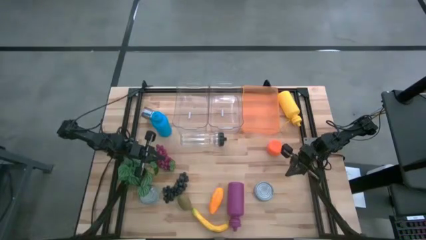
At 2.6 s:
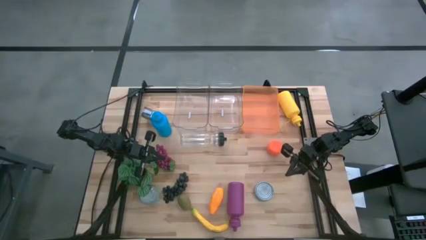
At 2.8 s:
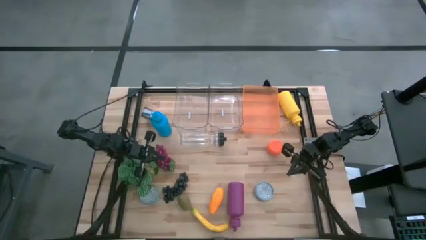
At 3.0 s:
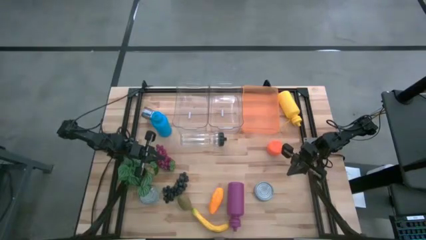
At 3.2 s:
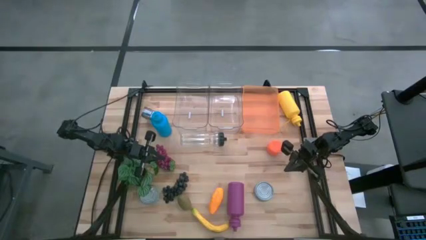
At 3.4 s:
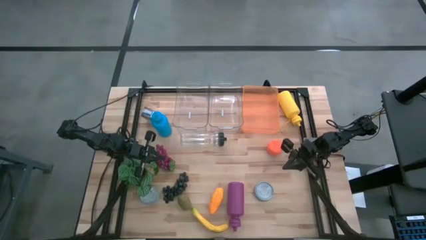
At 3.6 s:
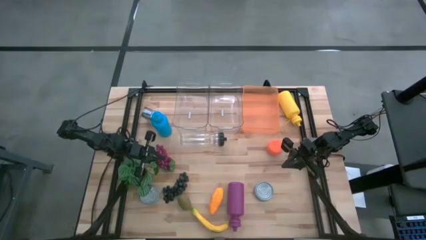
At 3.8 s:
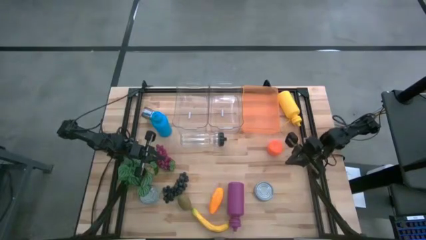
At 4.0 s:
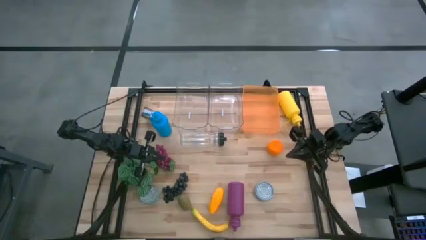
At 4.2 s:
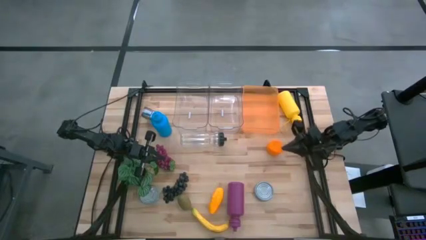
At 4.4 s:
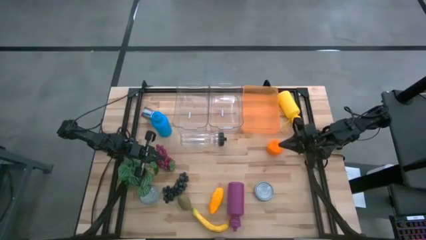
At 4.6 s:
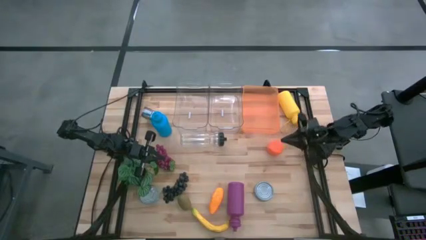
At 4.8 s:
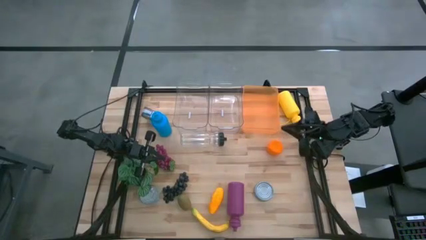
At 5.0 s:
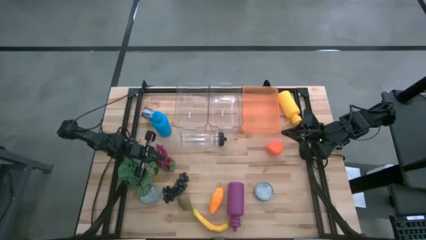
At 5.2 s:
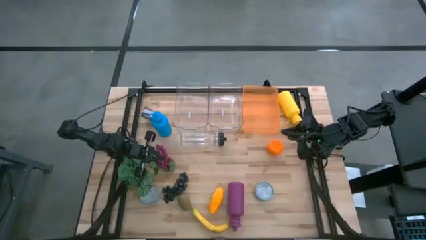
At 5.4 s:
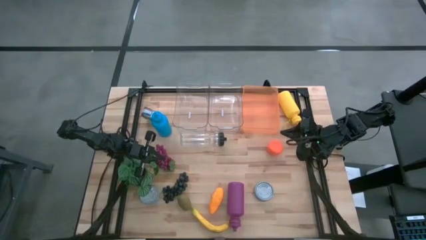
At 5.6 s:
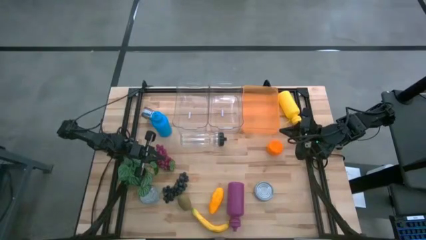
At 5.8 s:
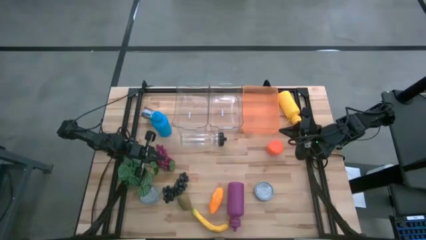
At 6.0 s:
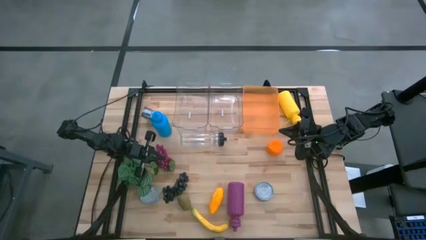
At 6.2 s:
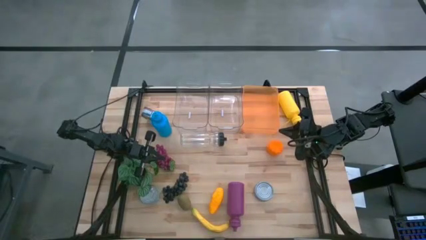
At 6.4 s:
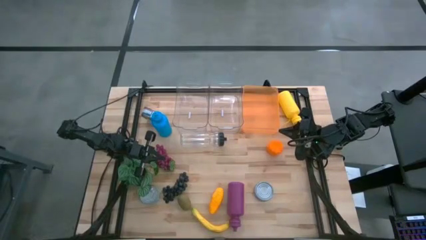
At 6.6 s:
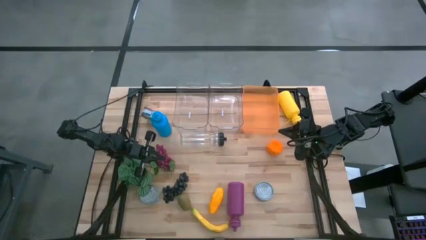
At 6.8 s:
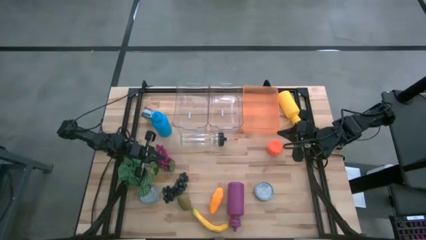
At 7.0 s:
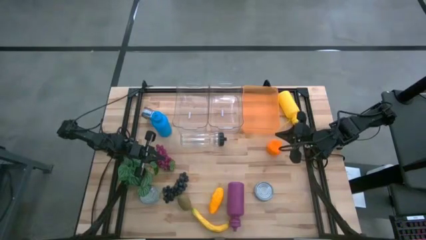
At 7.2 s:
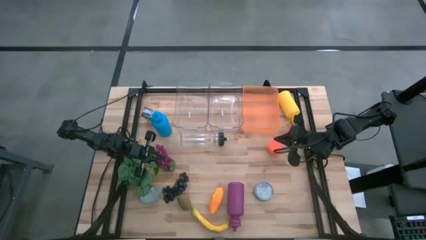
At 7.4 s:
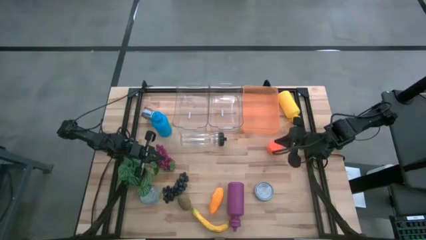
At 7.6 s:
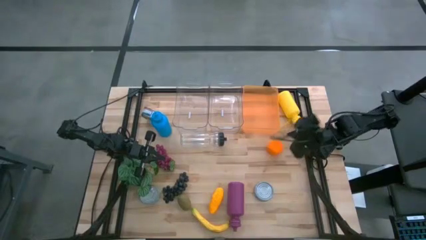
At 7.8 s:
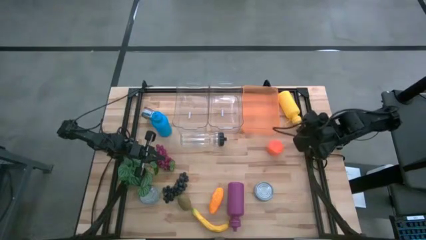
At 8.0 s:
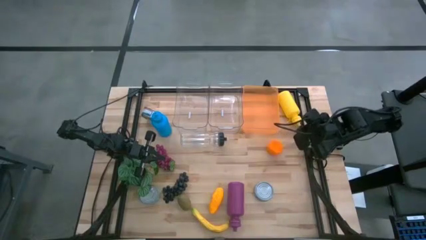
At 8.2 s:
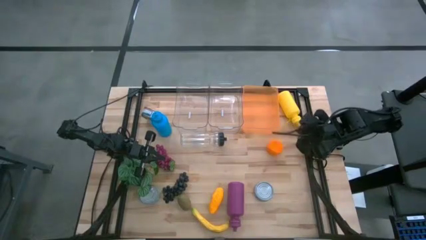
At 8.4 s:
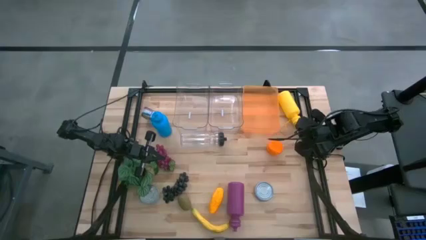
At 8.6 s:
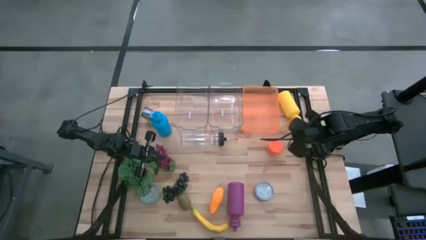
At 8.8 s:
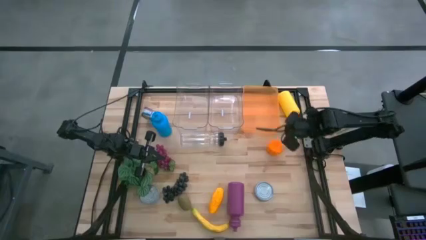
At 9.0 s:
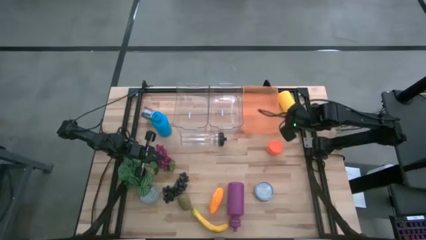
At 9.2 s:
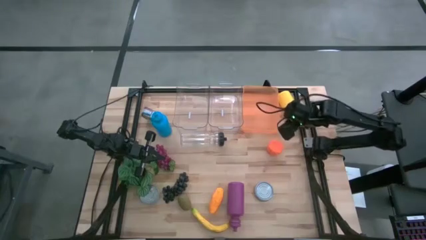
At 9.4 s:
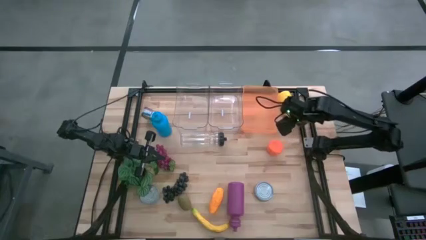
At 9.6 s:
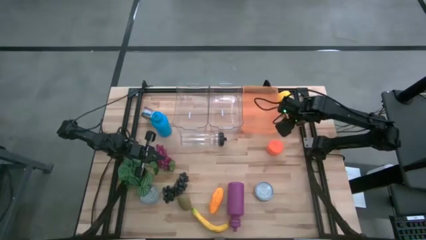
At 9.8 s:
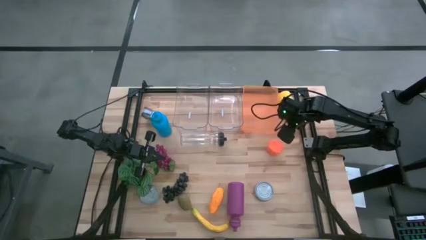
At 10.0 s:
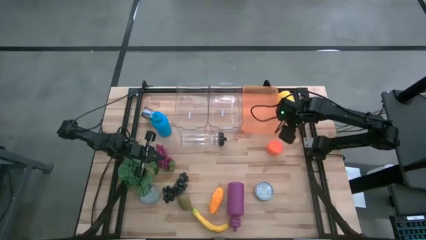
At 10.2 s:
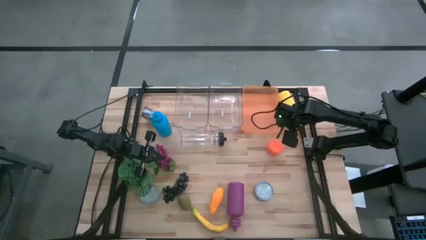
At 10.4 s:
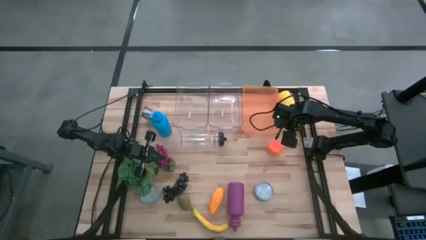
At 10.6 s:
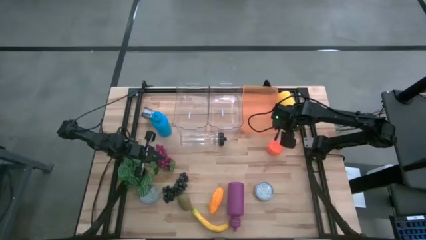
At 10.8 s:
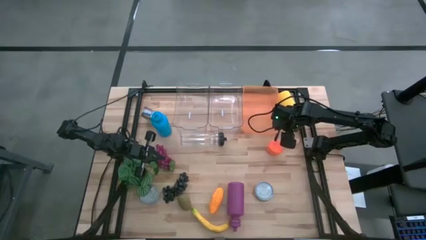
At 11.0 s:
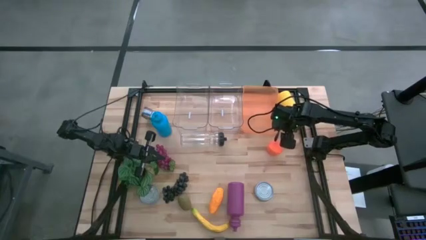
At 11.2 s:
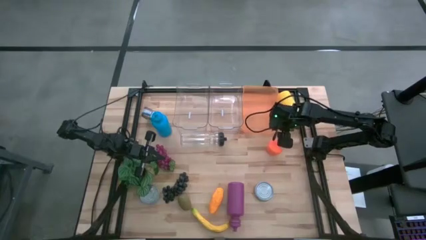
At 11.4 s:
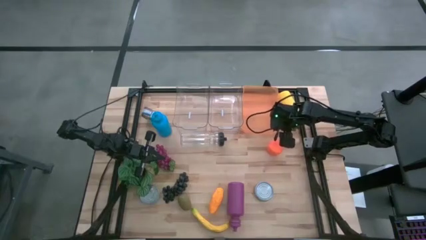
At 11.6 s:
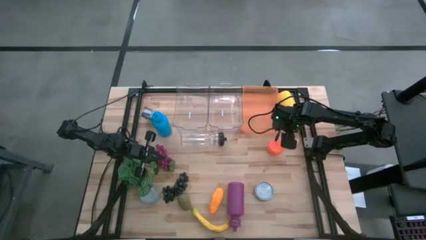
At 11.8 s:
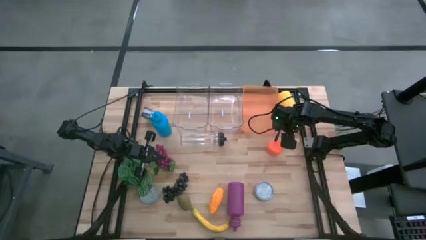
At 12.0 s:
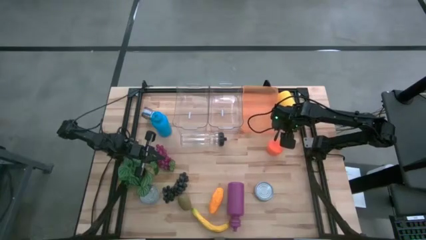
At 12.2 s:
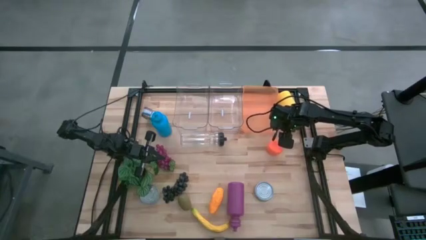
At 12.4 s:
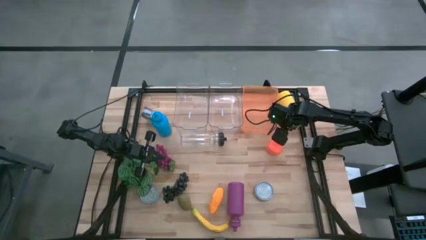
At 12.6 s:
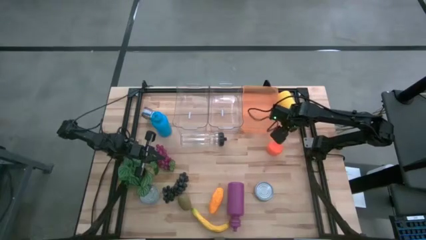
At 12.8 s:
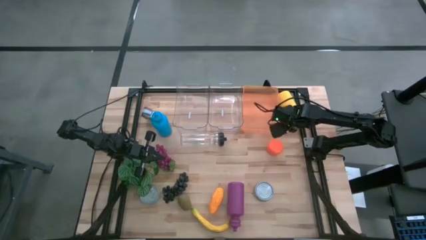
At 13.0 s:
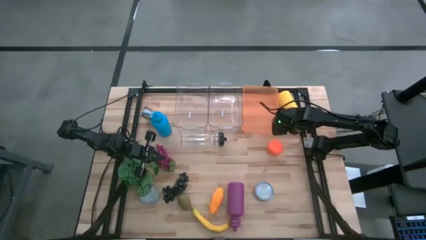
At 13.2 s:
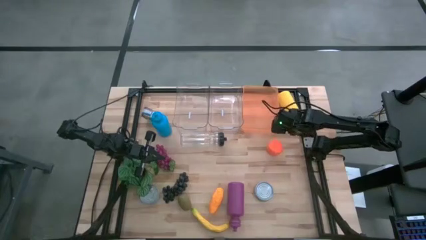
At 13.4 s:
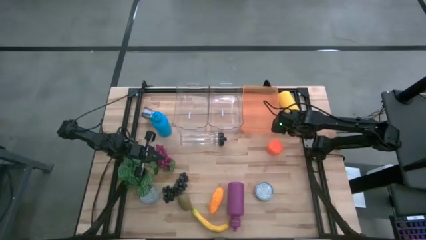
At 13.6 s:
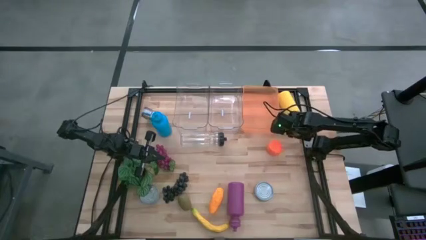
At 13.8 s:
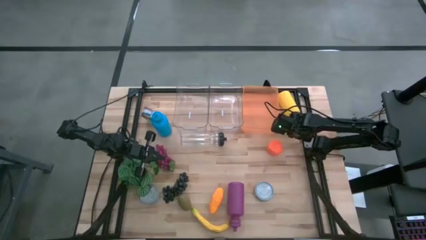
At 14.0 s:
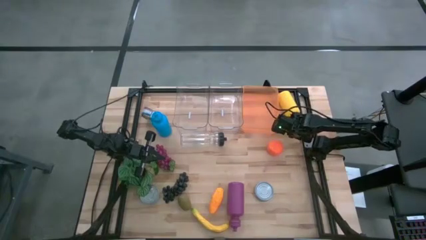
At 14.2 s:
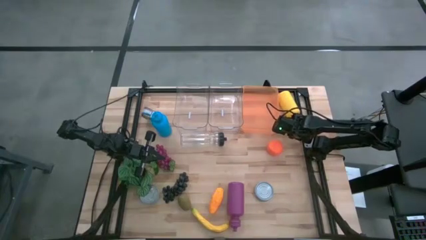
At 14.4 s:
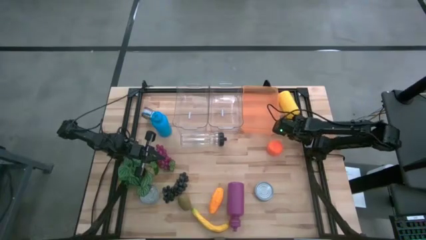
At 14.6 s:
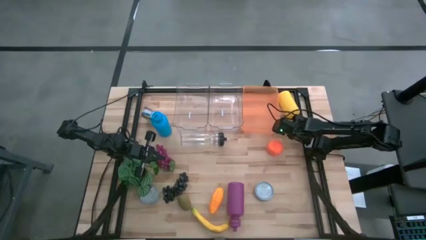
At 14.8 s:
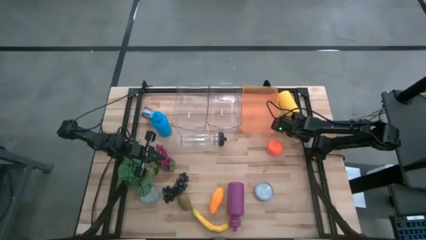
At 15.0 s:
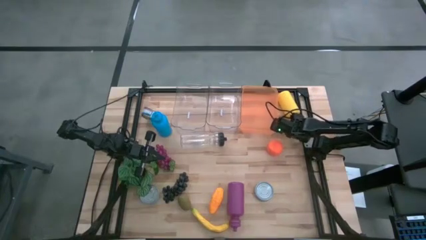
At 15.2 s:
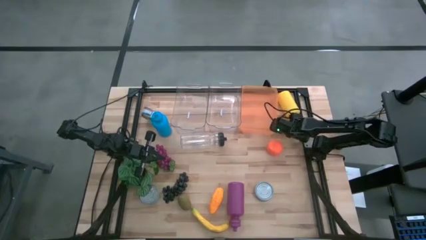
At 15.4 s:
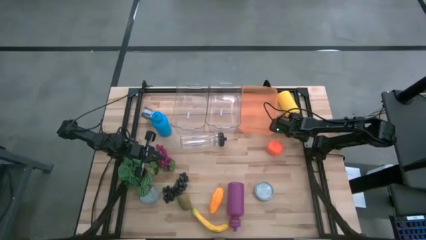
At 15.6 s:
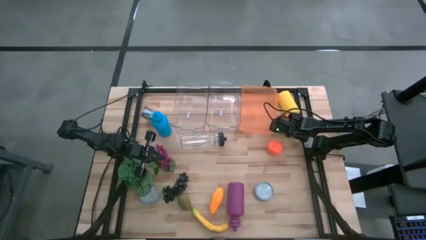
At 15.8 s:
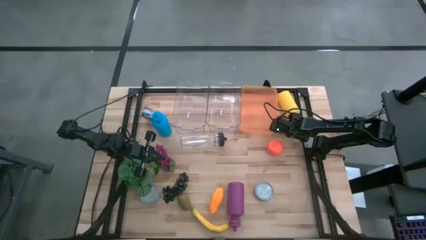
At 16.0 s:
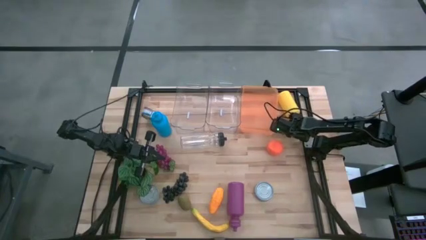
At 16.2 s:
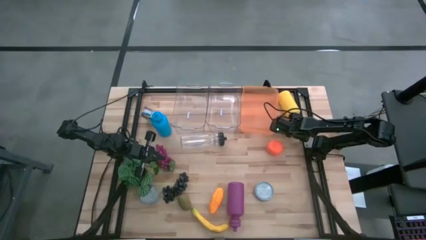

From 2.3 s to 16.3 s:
Task: Pick & Place Food Item
Put the yellow water bottle into the orange bin
